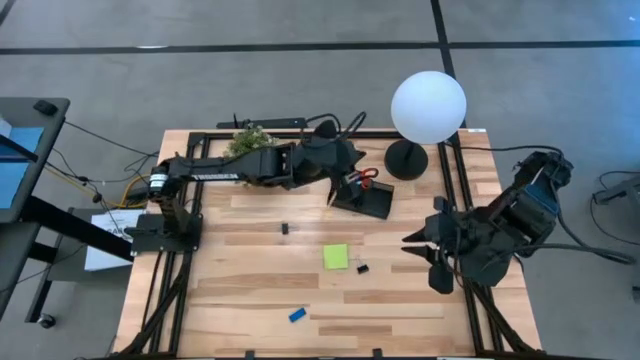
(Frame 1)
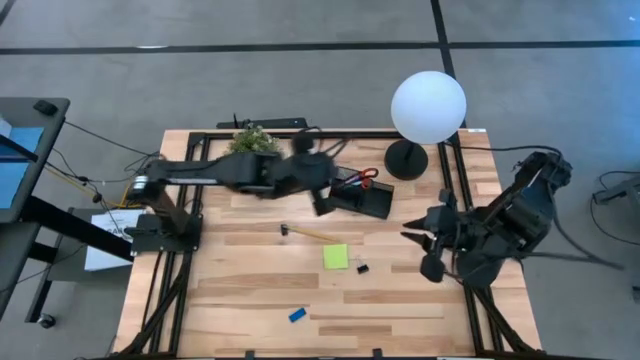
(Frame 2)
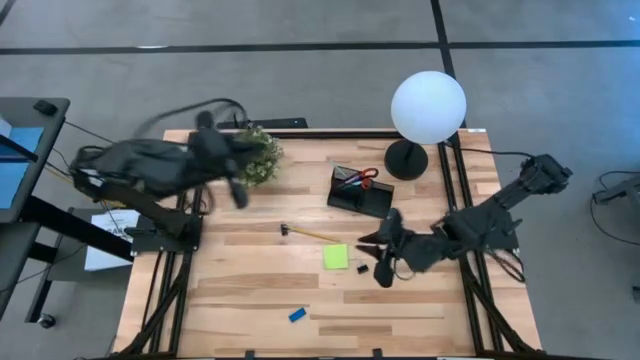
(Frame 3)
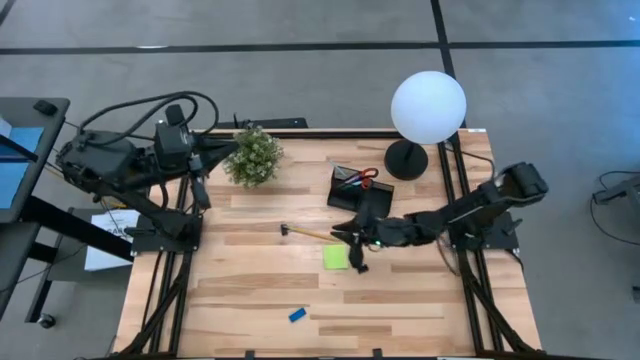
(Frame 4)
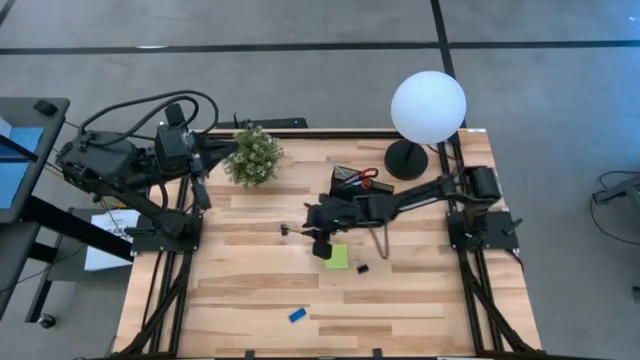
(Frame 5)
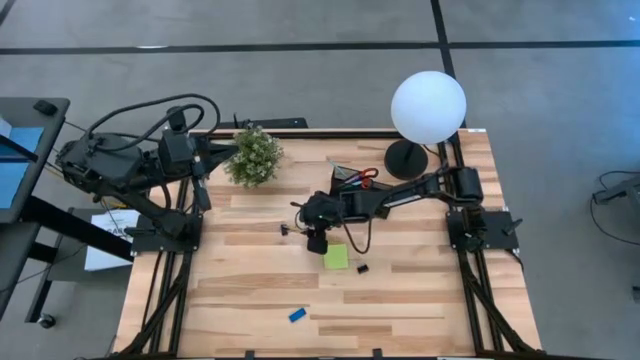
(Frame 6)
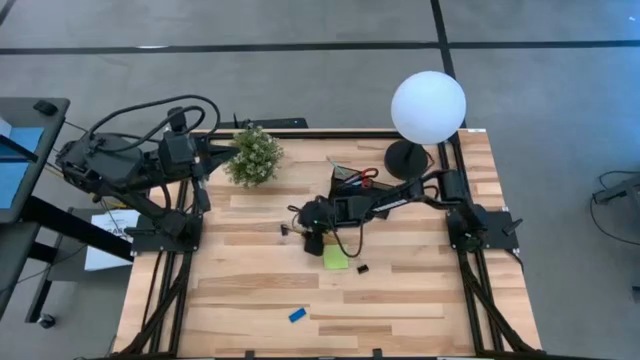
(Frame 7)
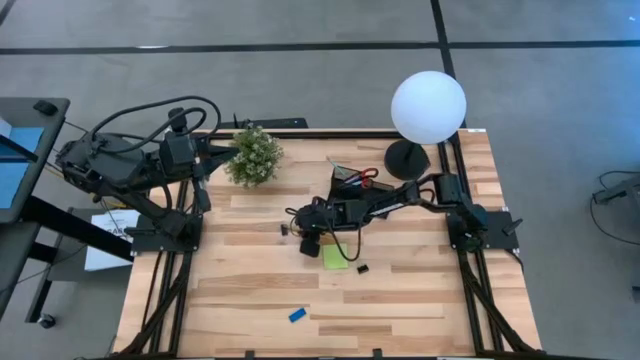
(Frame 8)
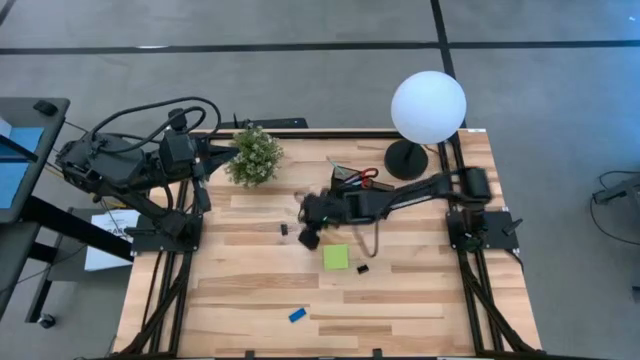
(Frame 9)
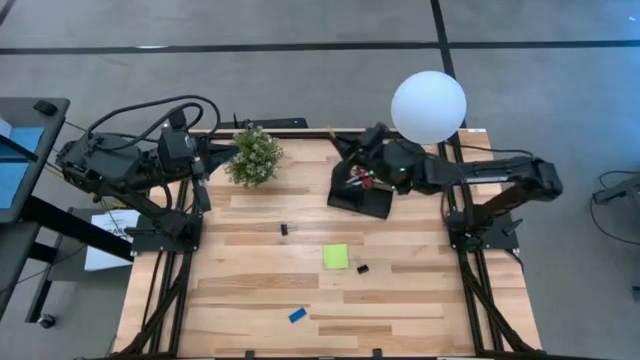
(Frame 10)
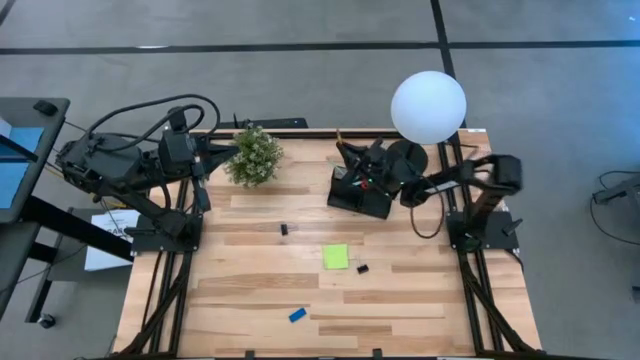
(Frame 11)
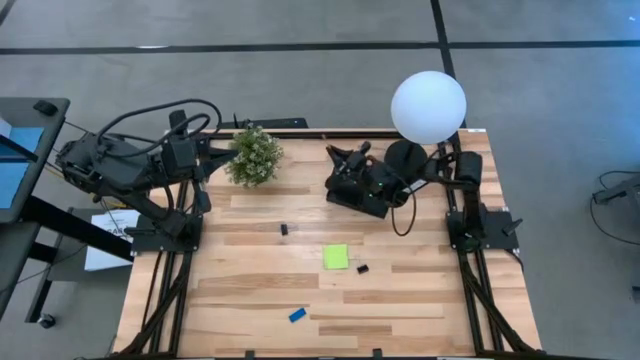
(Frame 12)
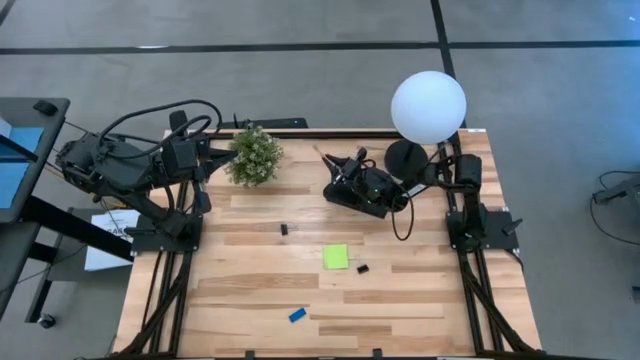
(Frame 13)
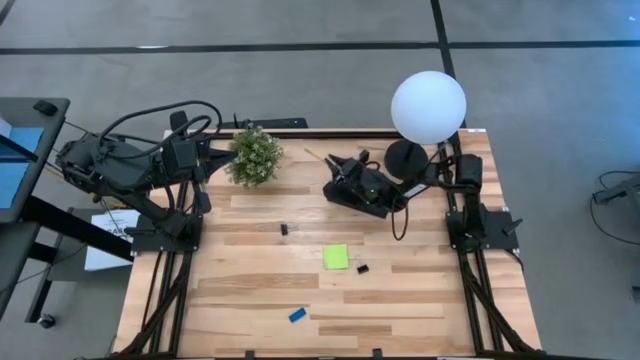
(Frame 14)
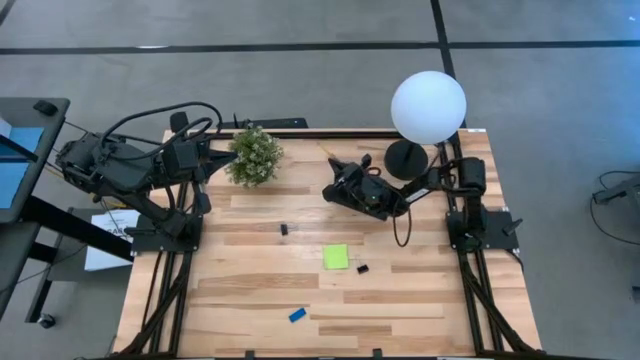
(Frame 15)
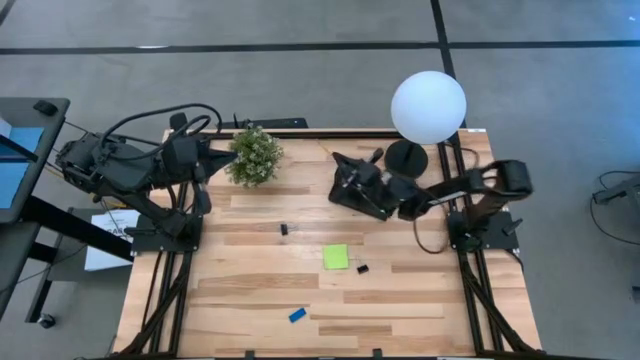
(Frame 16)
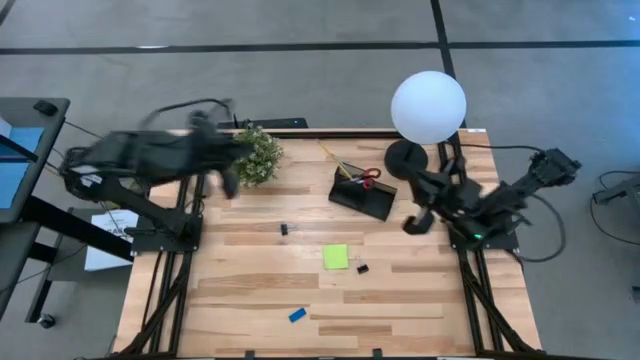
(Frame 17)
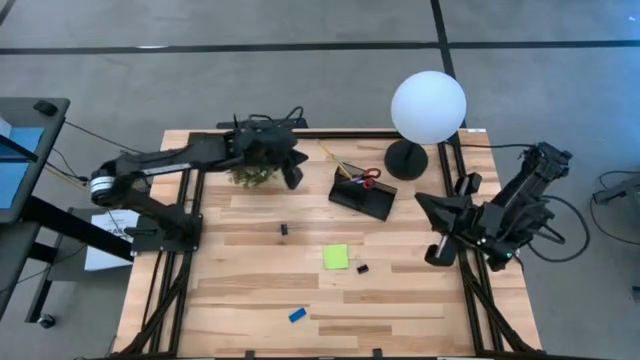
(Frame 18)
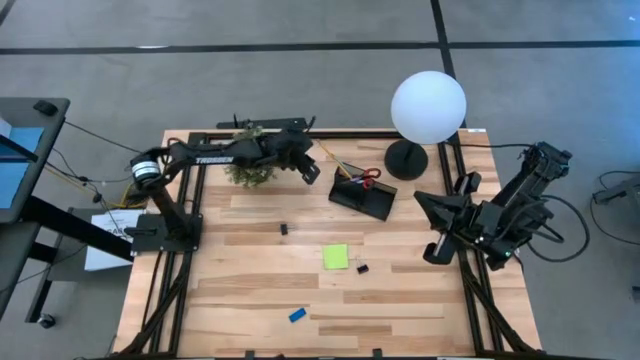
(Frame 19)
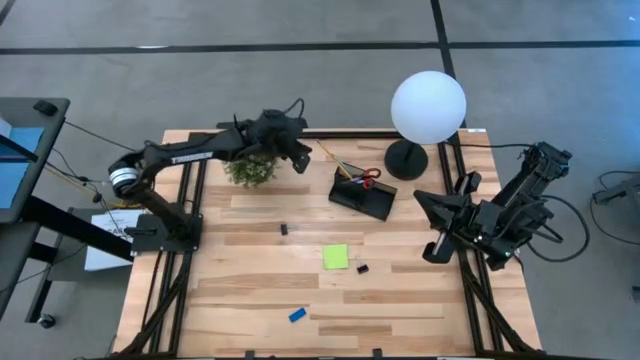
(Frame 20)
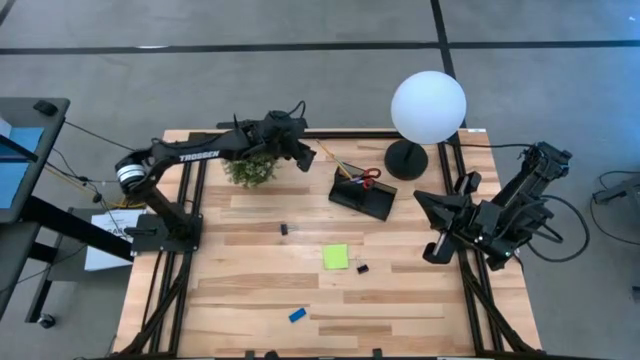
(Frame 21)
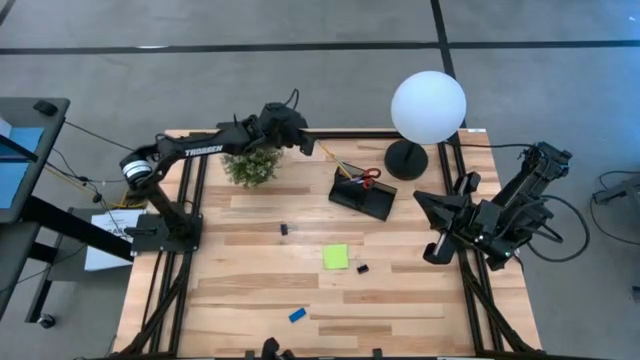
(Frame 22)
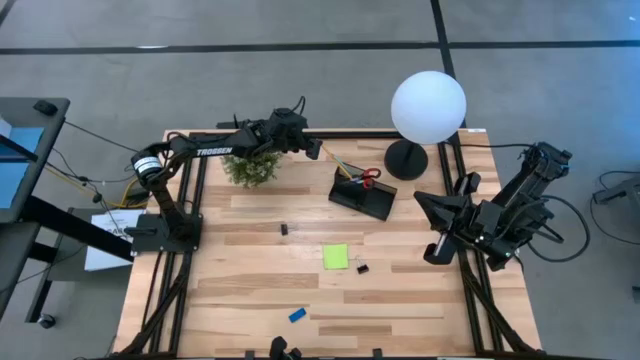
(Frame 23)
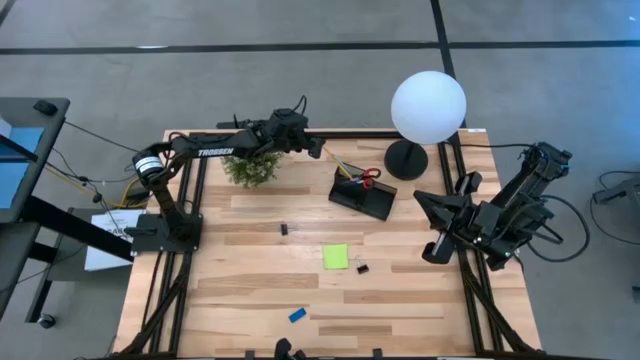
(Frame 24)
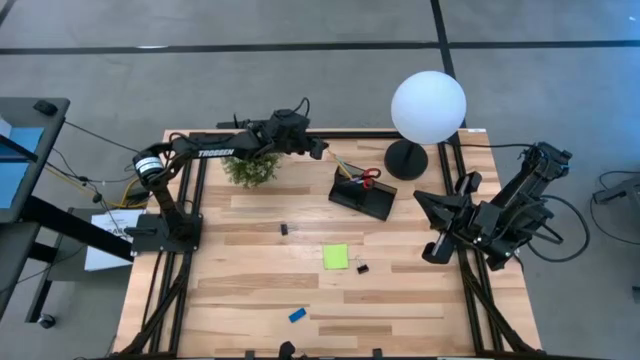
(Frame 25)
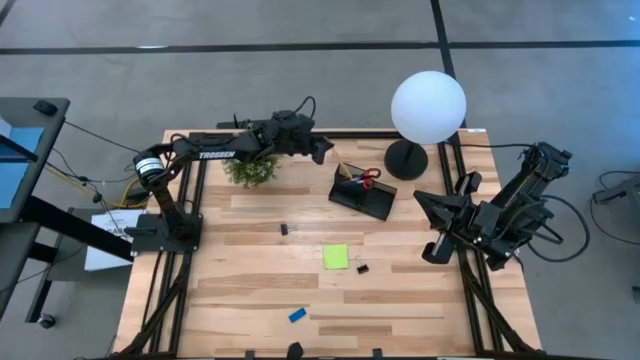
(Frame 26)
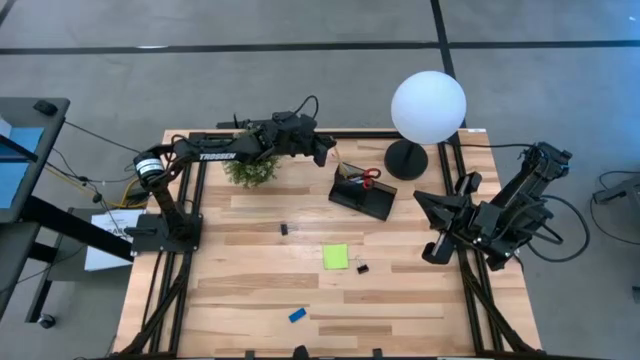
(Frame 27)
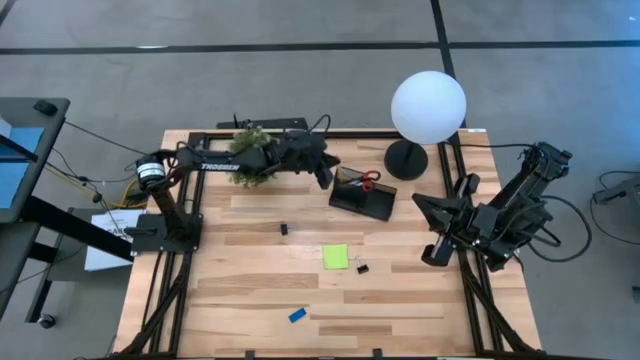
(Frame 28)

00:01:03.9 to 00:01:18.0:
Task: Pick and place office supplies into organizer
Put the yellow pencil into the black desk organizer

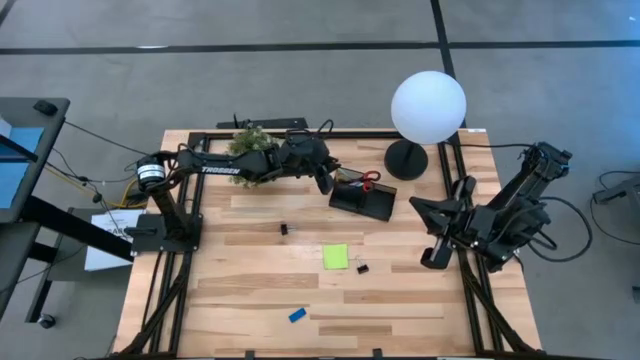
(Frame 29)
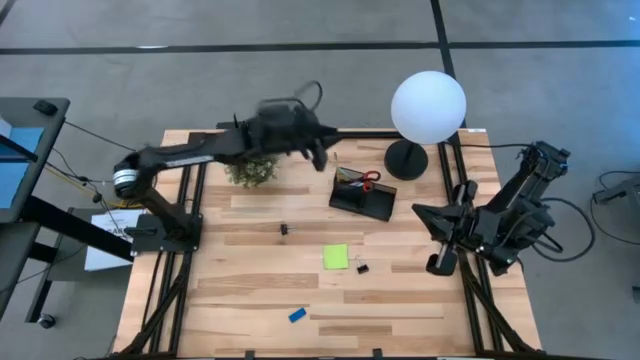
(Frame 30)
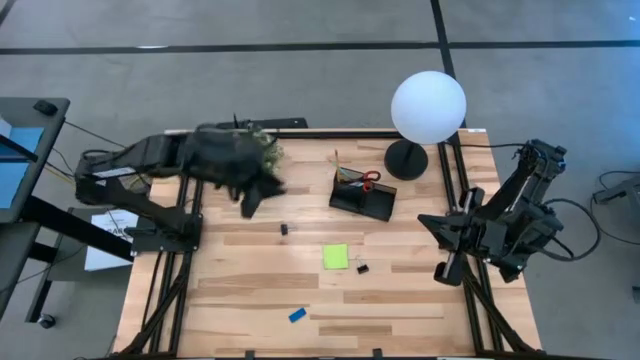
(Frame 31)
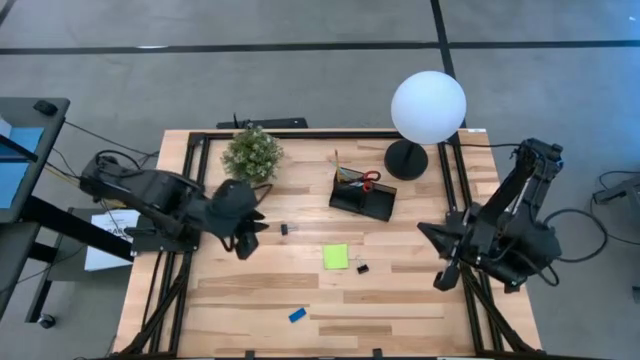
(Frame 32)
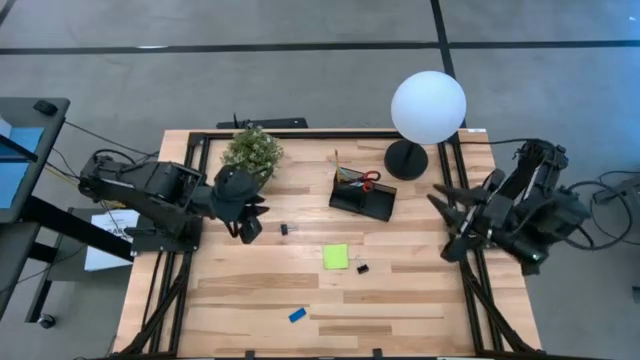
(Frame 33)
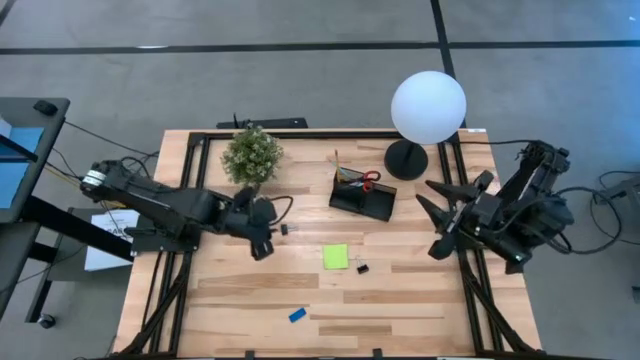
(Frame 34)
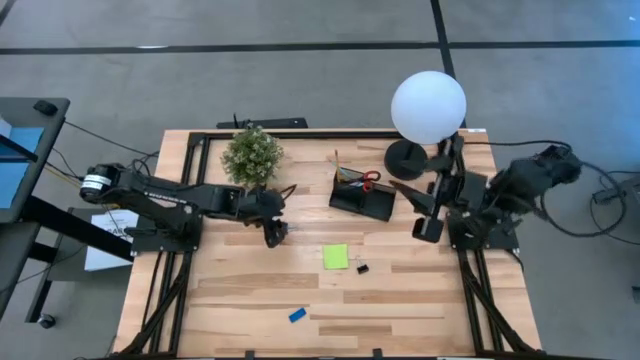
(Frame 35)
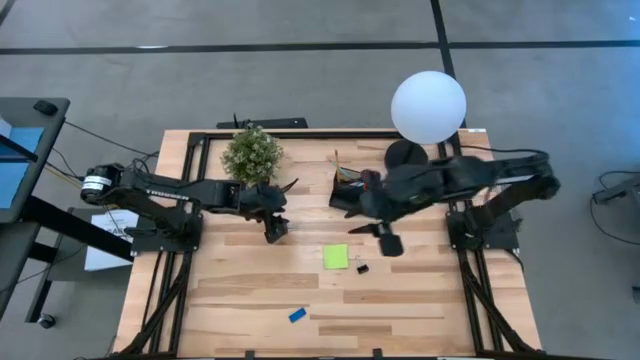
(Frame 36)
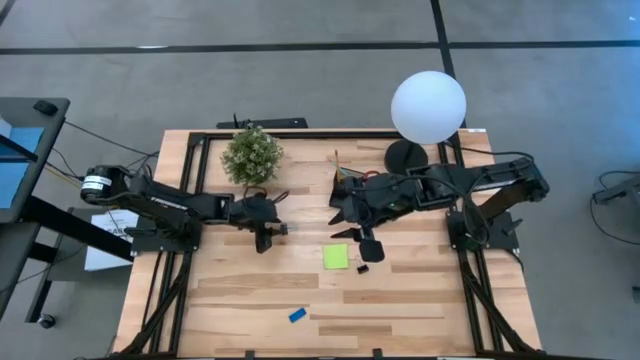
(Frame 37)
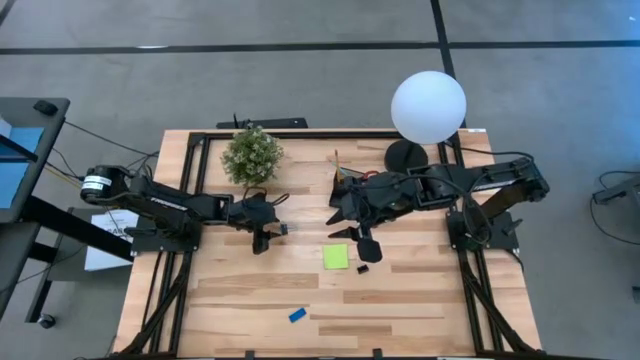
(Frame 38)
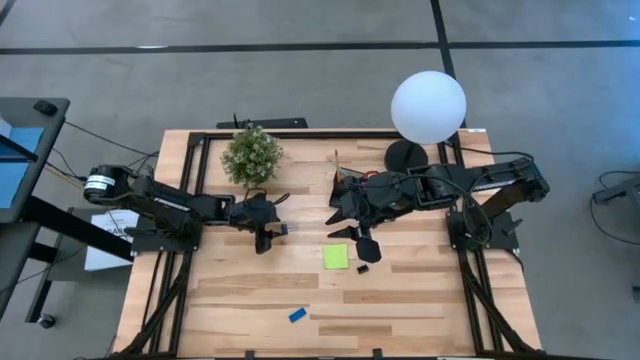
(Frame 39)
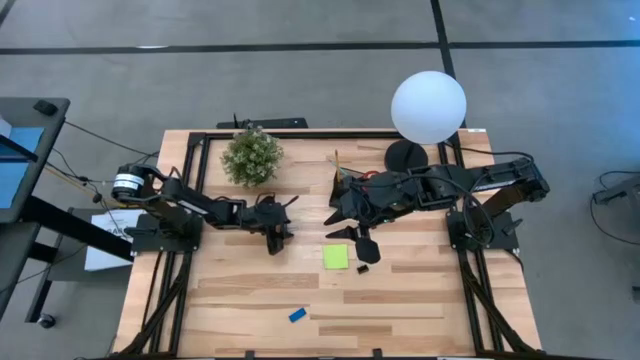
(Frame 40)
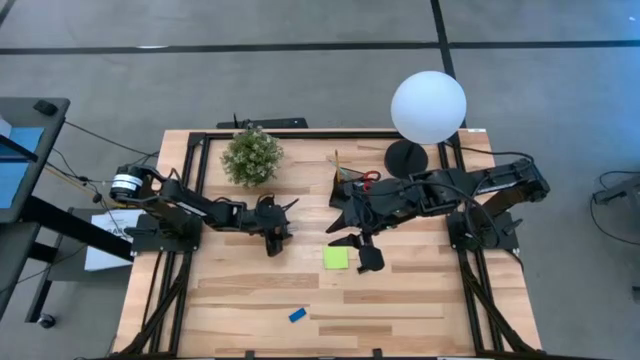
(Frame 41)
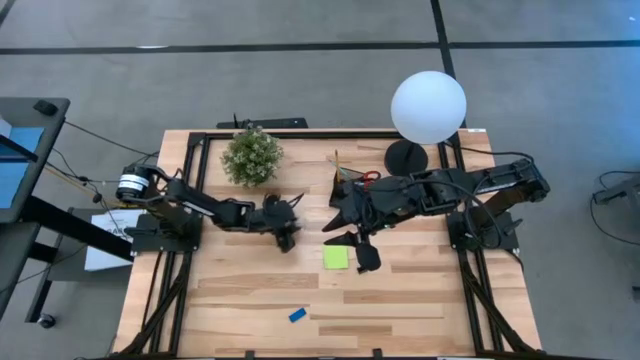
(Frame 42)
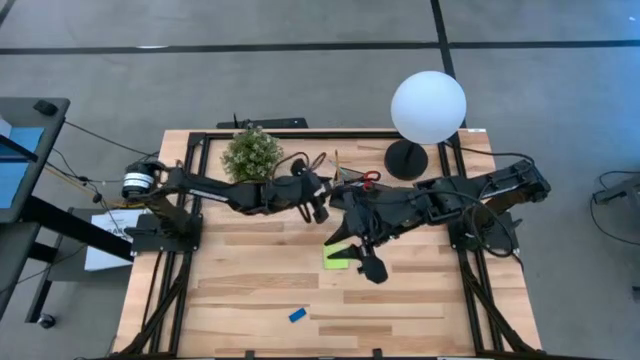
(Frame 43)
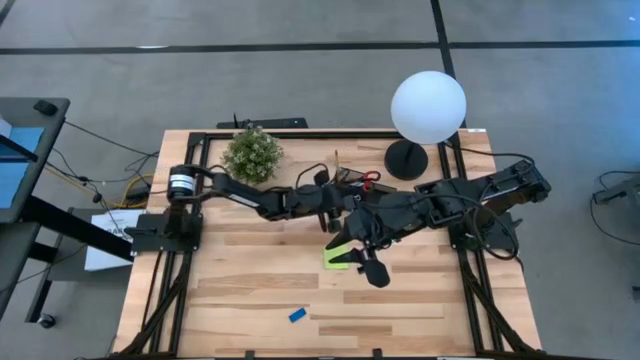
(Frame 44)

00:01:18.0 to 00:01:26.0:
Put the left binder clip into the black desk organizer
